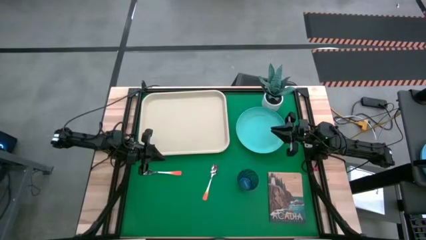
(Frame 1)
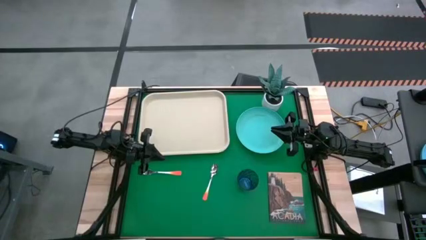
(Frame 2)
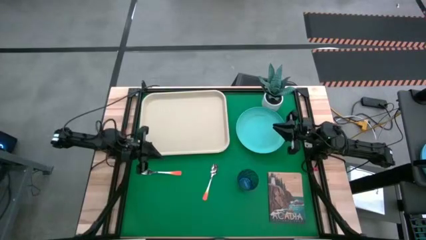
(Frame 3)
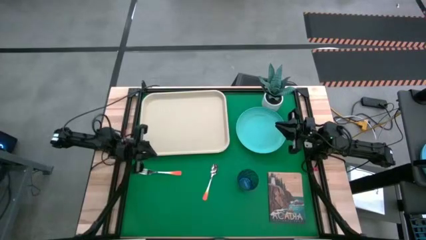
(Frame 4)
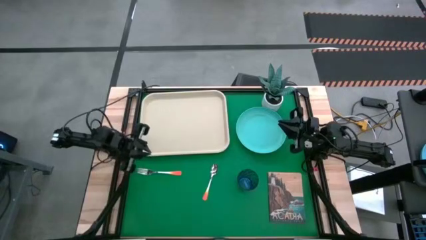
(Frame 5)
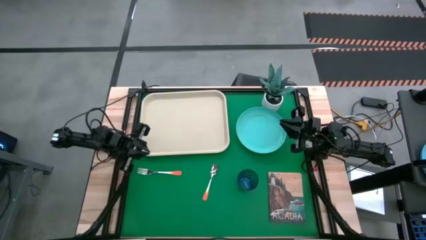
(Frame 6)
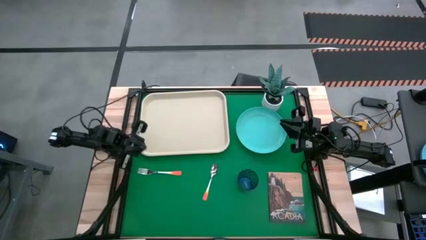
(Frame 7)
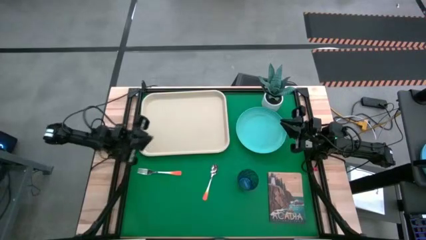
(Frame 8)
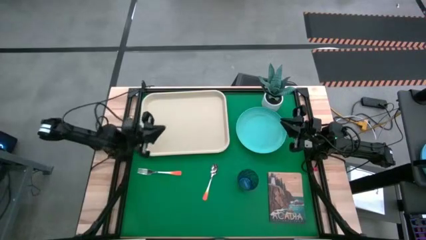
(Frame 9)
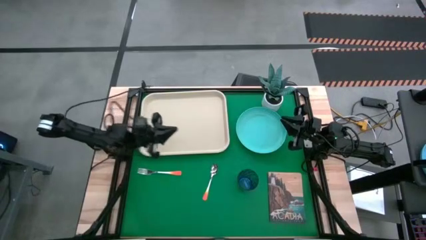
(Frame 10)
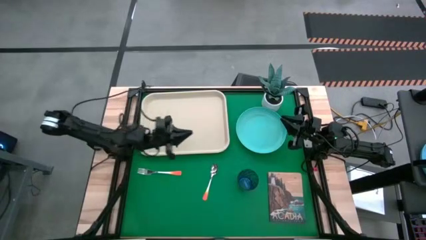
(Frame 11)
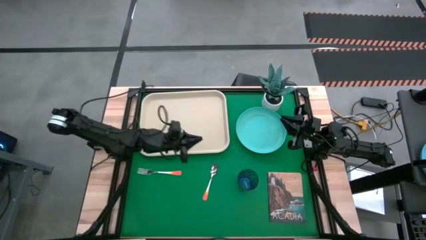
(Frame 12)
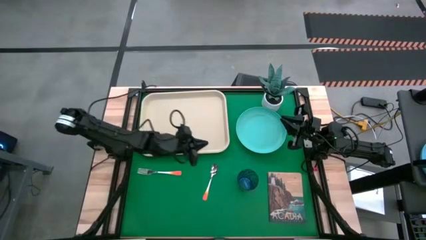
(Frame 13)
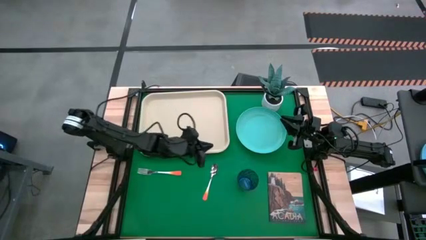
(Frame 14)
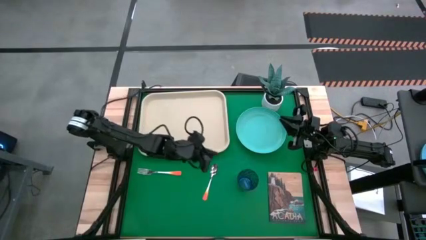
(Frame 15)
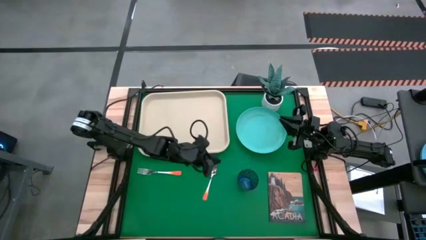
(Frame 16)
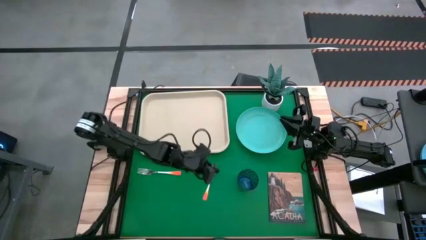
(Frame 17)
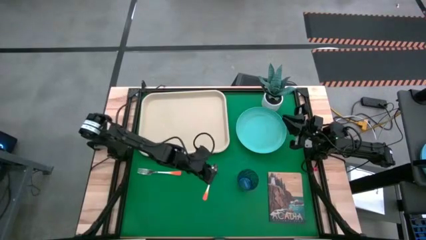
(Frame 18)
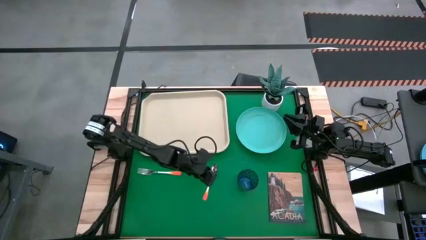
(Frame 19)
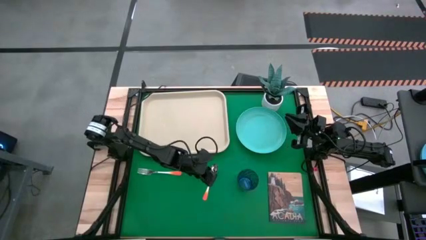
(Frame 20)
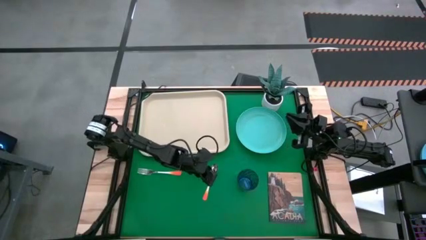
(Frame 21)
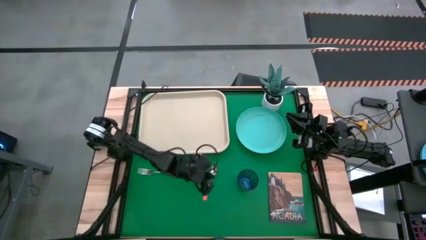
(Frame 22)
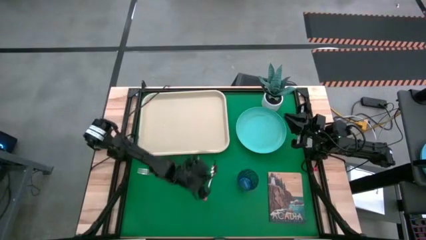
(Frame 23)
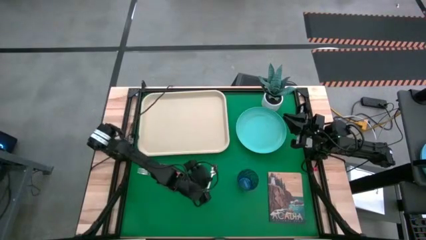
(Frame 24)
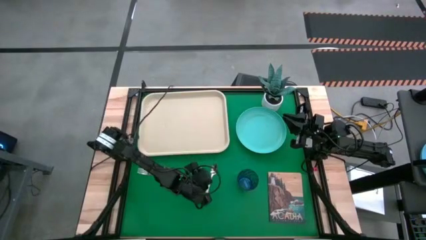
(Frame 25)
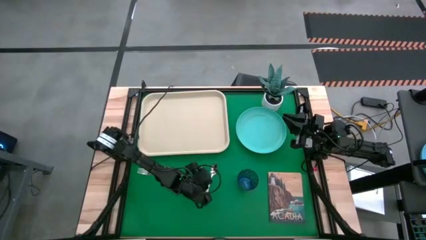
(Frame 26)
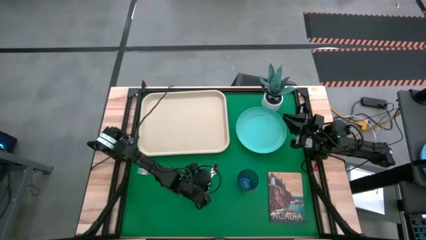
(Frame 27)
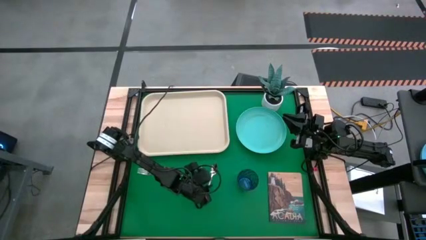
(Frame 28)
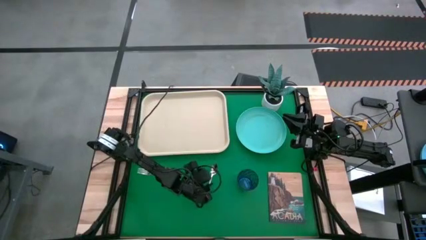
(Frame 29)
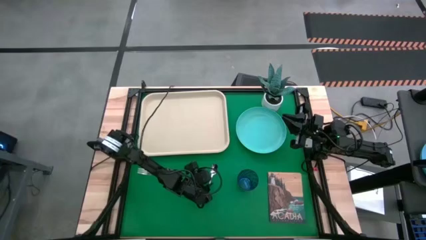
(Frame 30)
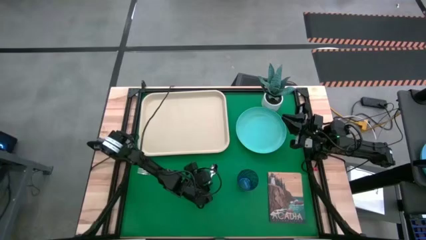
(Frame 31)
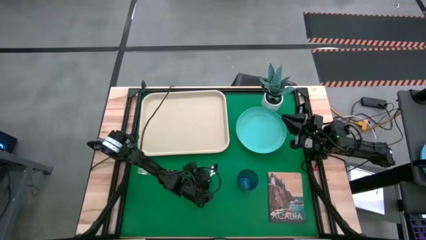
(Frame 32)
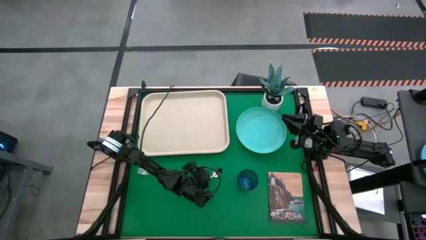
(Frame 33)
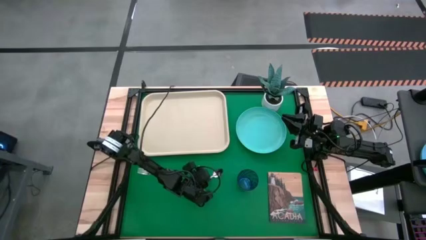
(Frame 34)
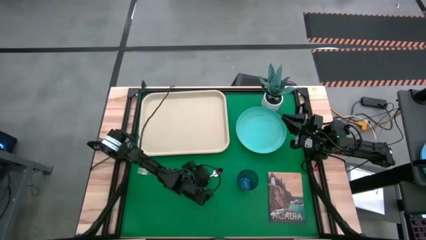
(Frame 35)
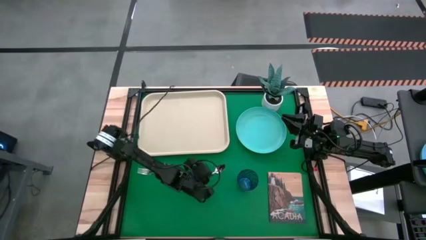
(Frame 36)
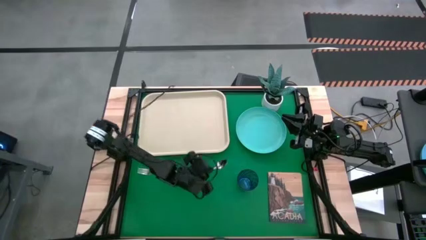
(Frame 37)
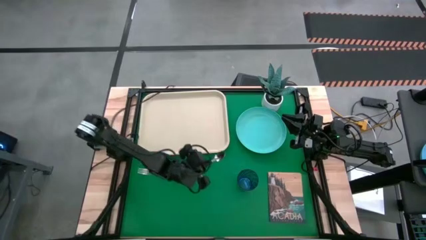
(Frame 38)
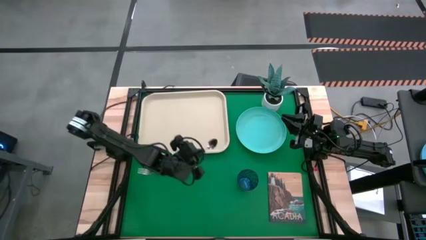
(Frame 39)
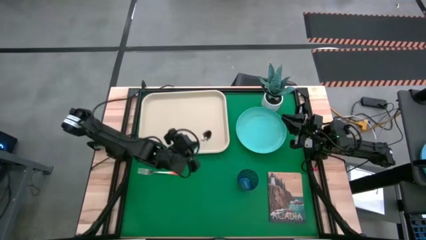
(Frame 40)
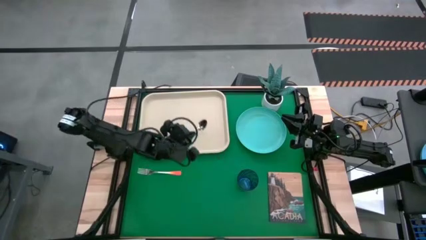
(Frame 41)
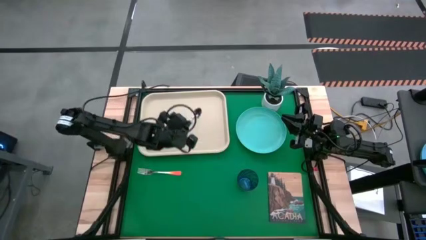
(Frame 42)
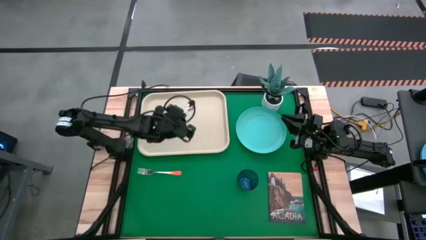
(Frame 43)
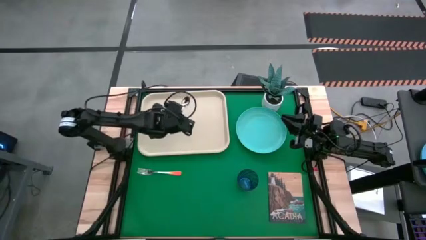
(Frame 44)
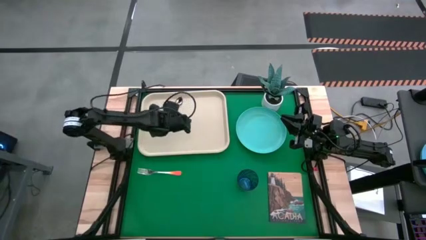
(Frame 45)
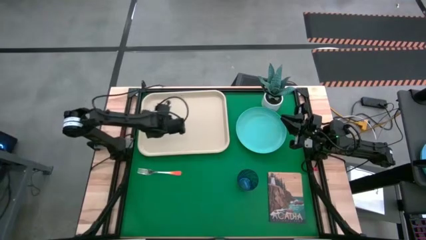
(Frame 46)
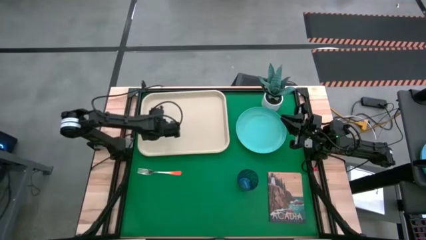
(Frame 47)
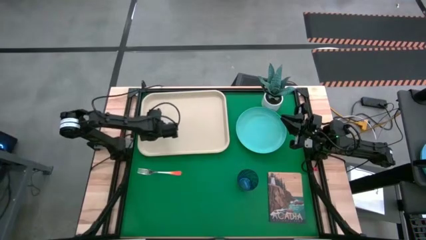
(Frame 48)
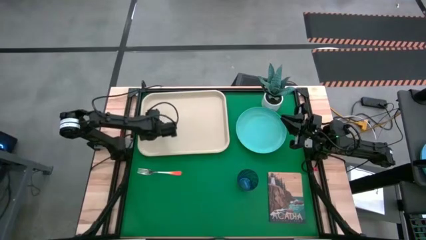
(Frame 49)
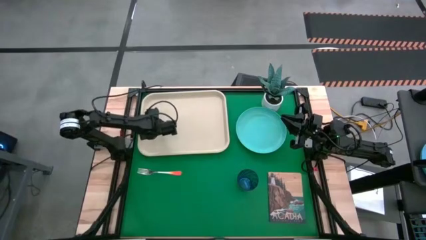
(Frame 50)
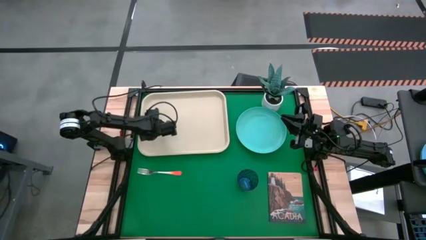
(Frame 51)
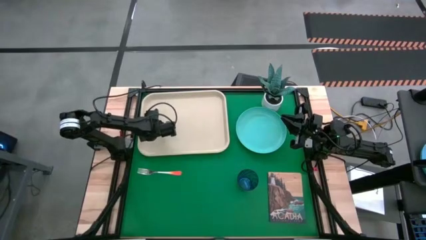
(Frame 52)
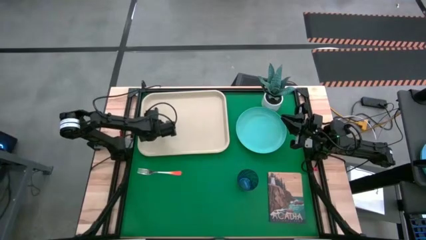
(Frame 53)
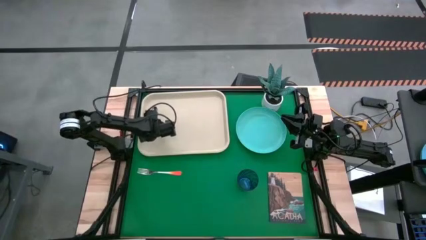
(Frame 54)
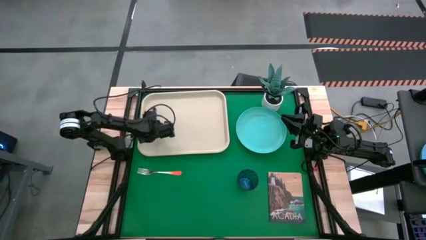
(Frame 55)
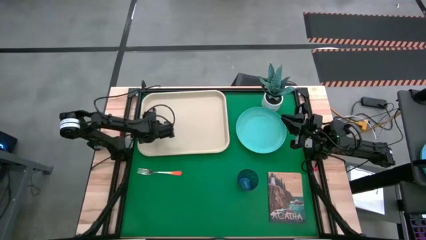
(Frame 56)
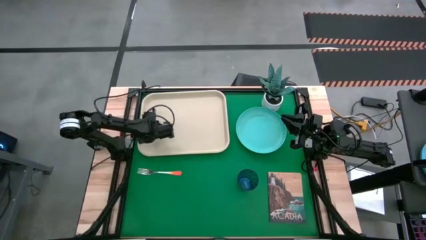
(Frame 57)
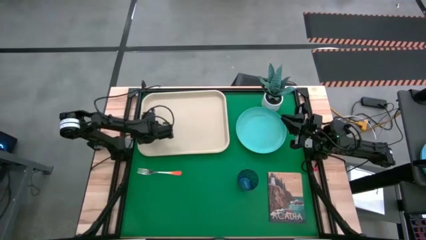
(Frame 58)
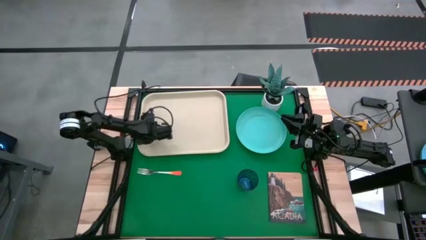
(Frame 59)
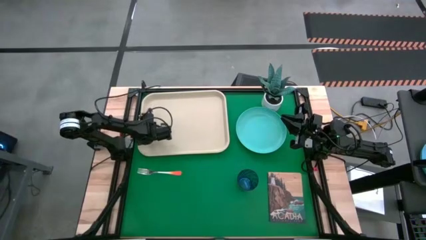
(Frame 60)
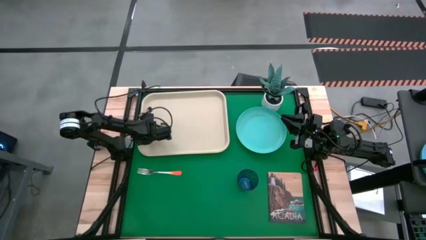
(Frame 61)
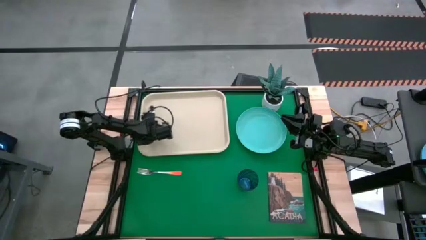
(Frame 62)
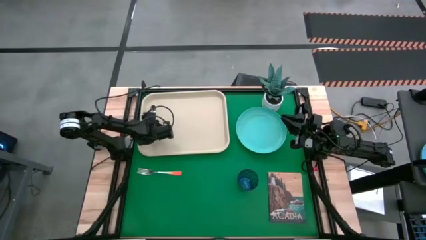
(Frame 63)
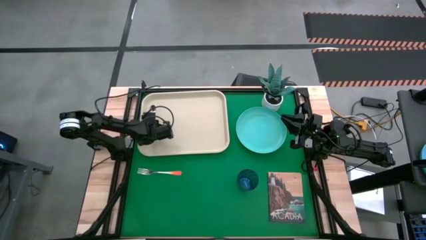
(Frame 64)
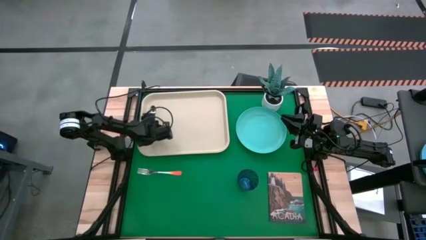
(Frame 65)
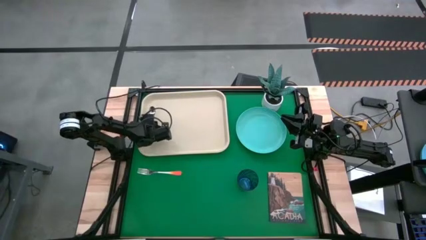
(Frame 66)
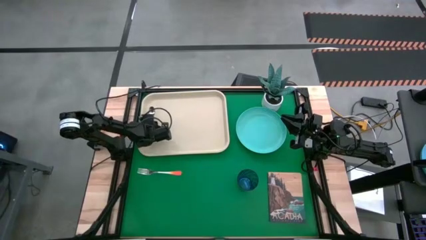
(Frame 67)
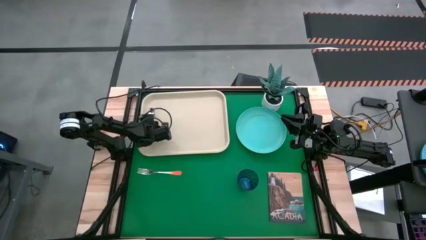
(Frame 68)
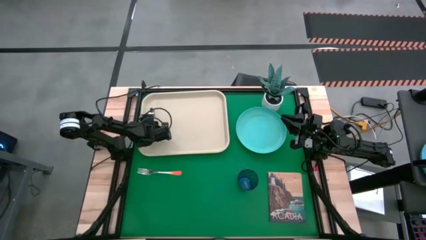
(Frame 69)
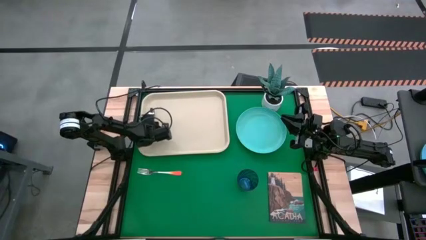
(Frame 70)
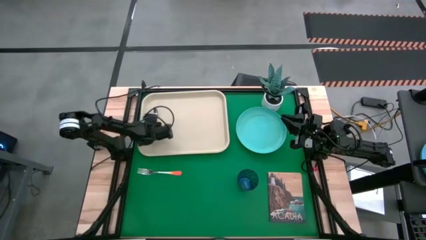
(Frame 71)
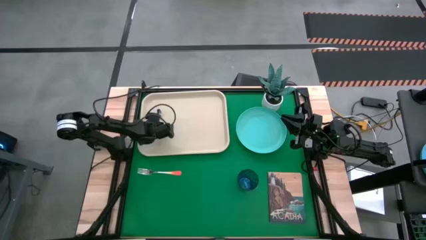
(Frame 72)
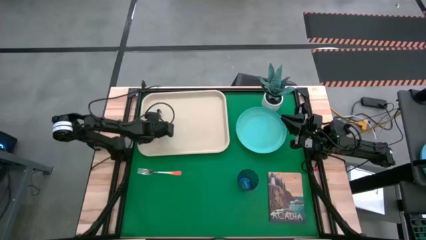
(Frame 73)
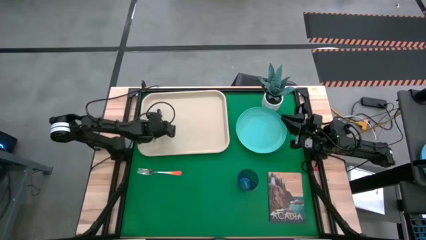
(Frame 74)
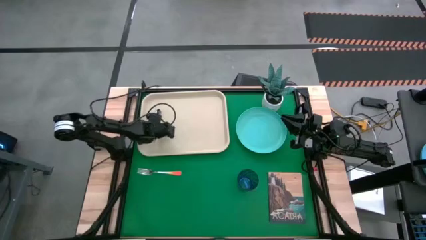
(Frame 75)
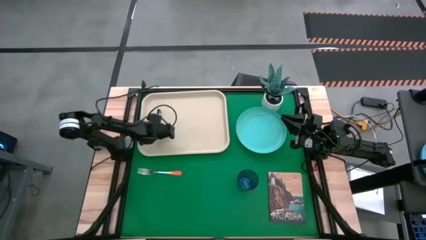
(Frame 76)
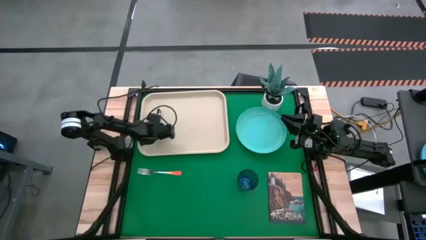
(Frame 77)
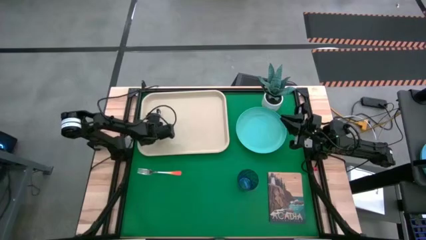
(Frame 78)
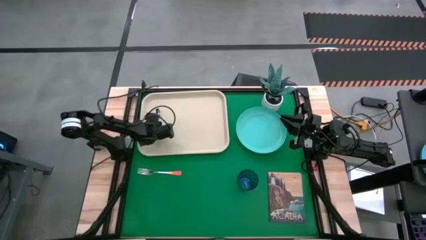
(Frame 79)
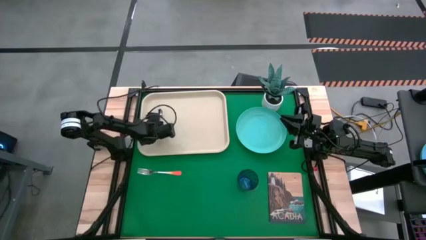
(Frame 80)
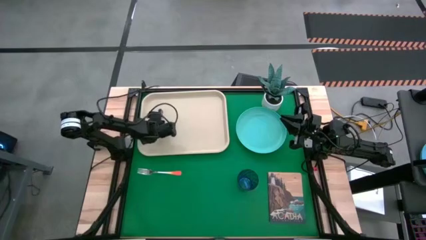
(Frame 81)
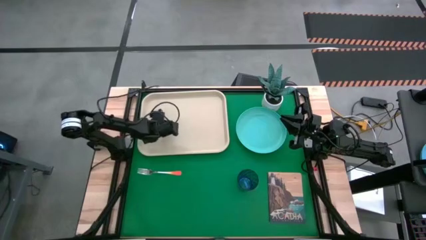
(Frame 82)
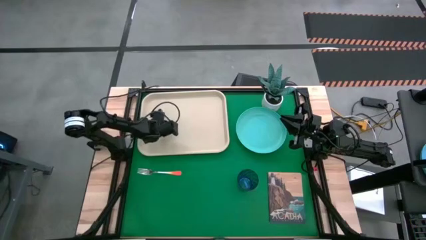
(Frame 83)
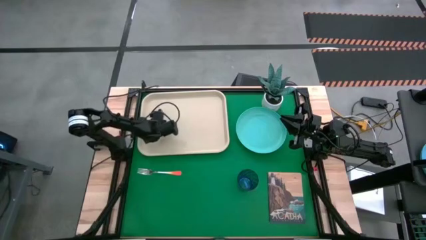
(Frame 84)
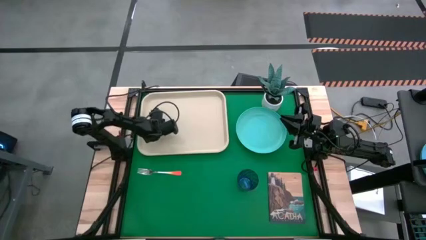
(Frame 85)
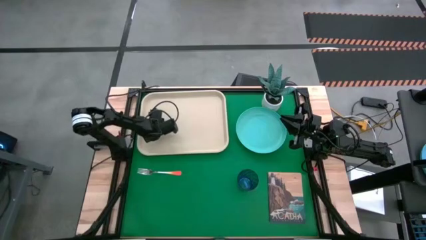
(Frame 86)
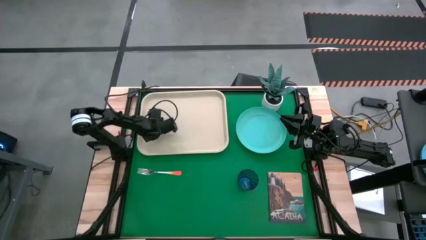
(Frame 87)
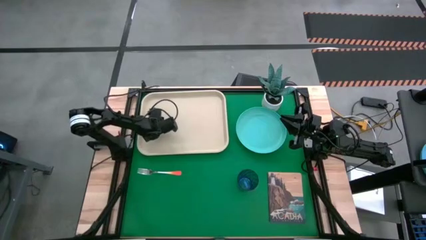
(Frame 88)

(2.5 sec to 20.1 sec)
Task: Pick and place plate/cup/fork/spoon on tray
Put the orange spoon on the white tray
